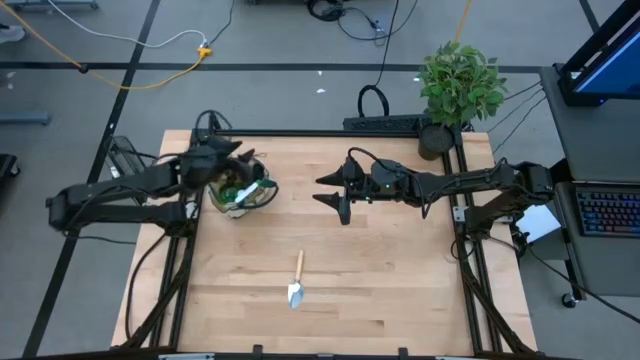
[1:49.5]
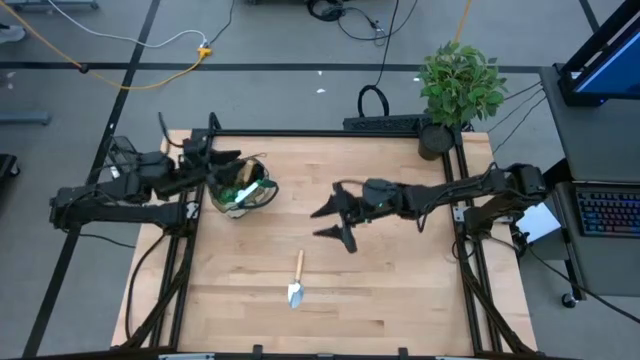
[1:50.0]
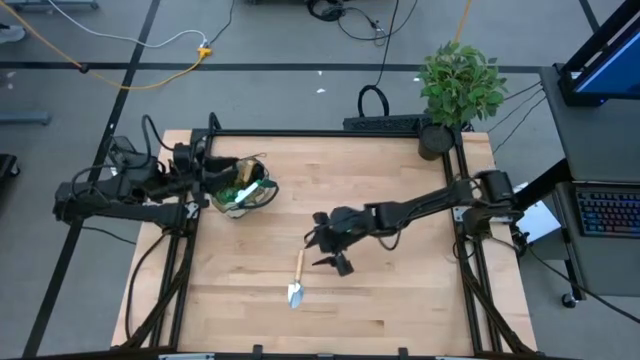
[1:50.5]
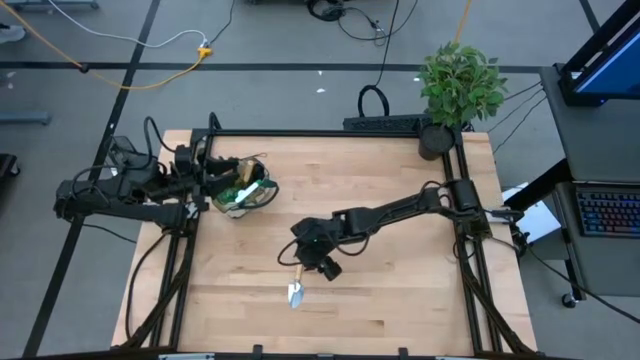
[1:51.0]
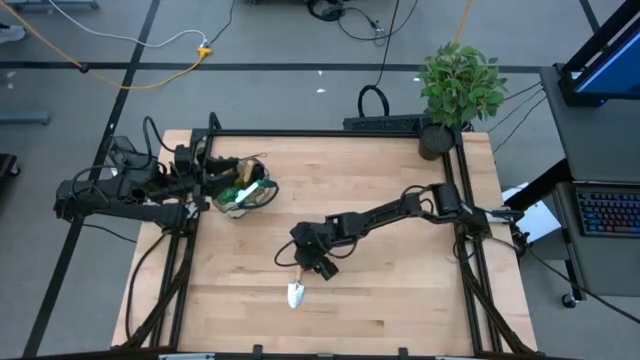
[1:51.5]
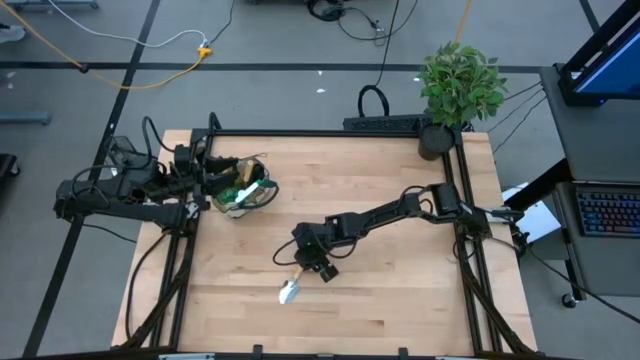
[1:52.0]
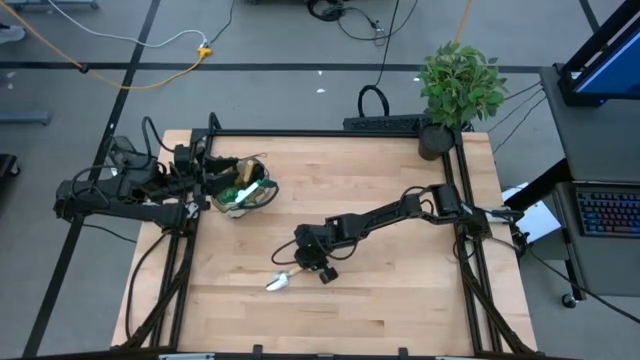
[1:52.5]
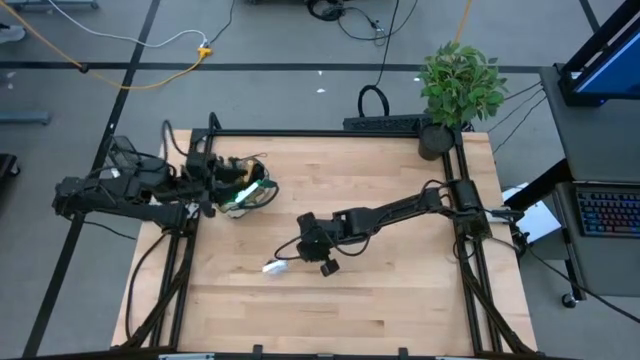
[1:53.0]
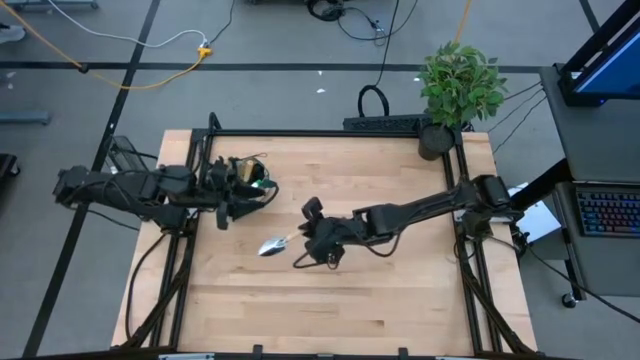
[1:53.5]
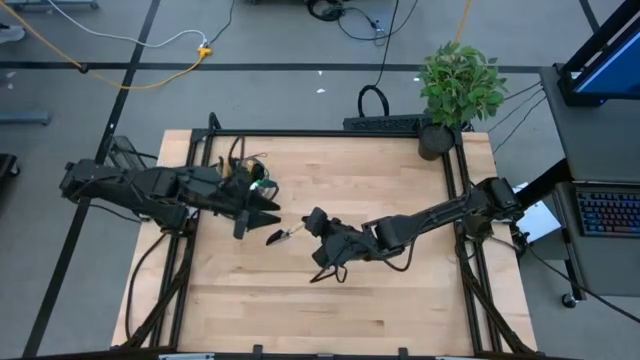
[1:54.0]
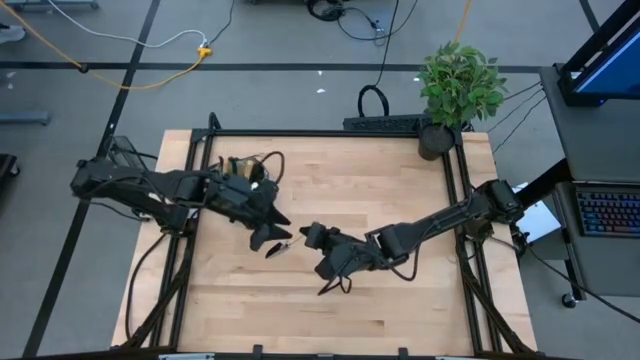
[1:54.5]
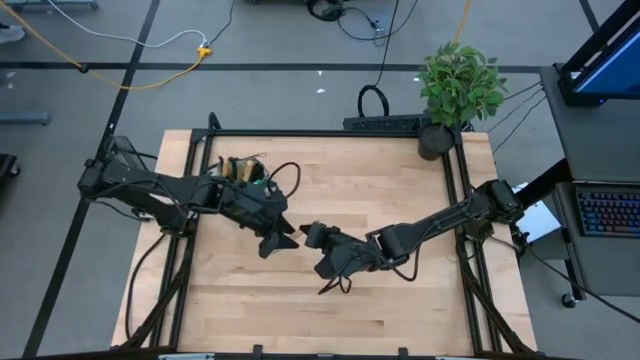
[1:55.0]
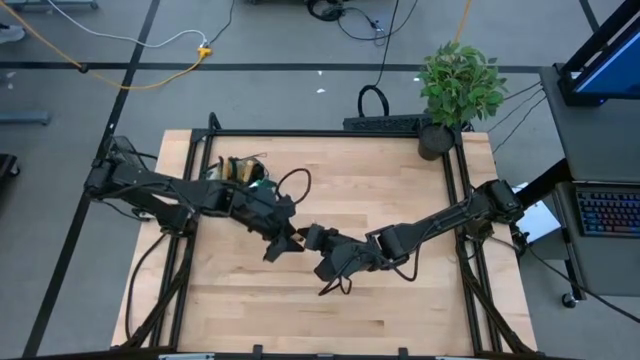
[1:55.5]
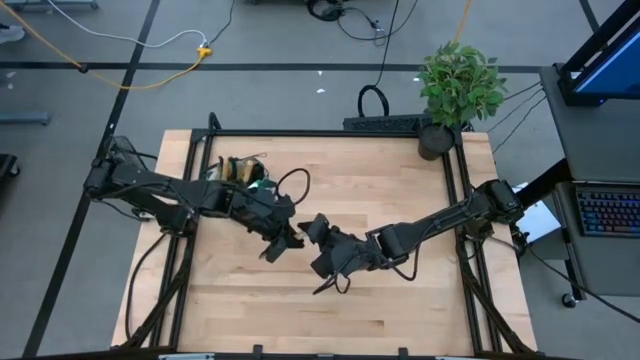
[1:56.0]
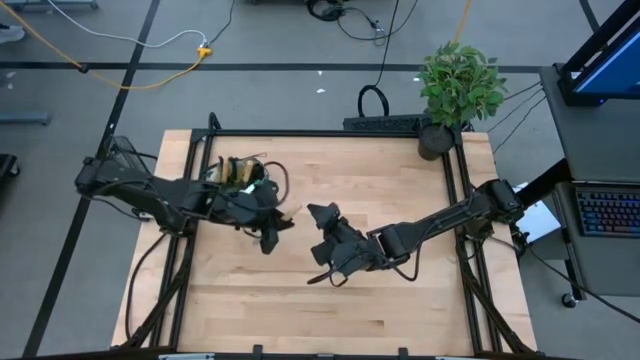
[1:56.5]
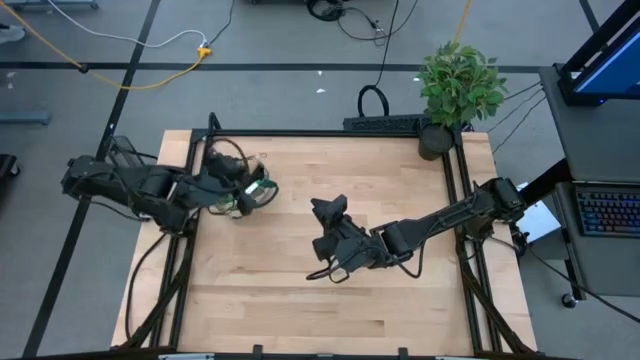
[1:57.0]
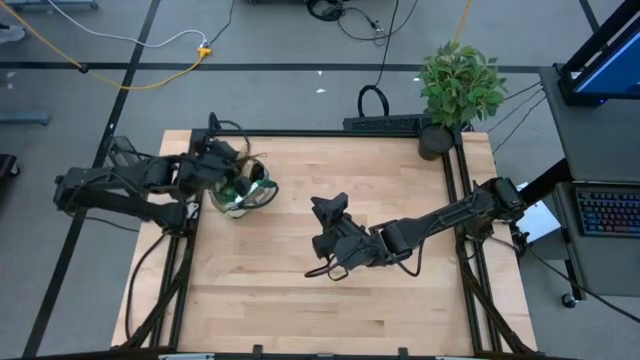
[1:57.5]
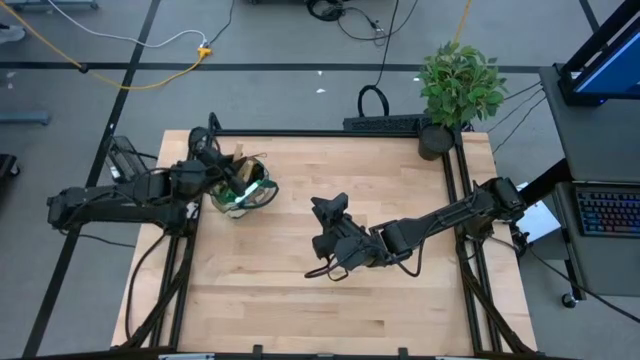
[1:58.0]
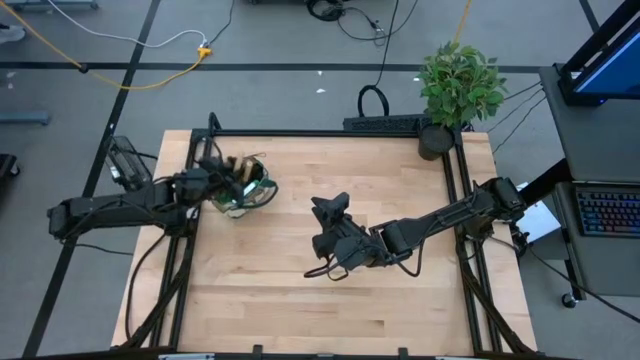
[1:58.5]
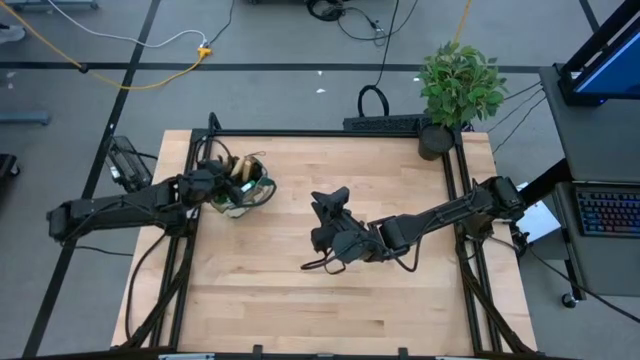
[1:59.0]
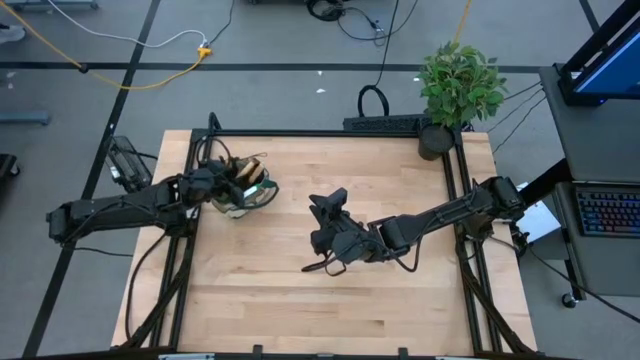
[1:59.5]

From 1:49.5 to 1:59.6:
Task: Pick & Place Garden tools in Gardening bag
Put the trowel into the gardening bag

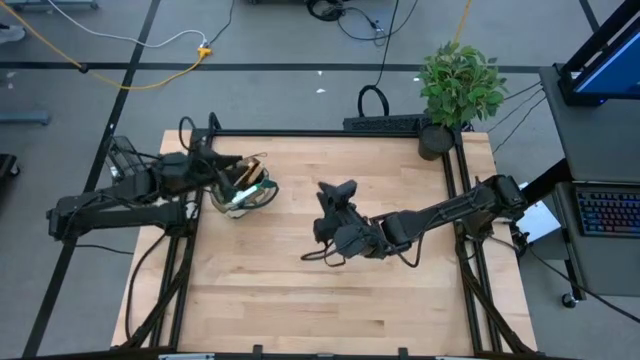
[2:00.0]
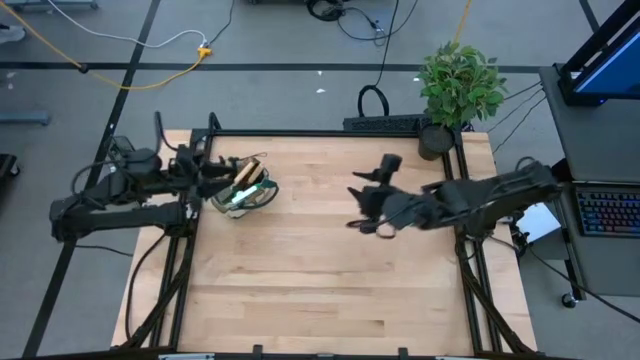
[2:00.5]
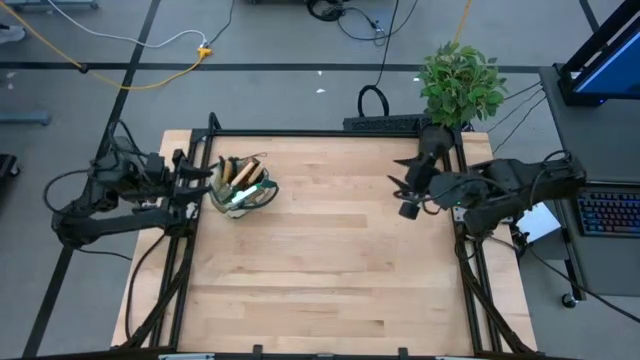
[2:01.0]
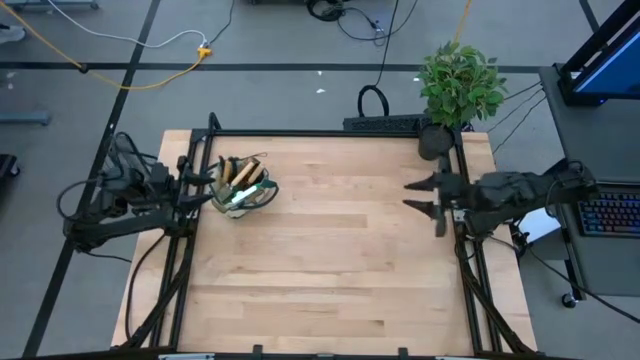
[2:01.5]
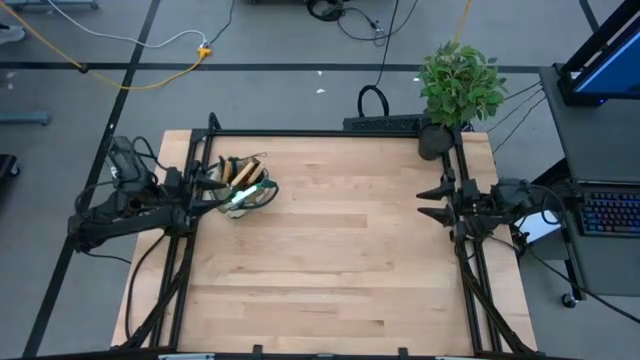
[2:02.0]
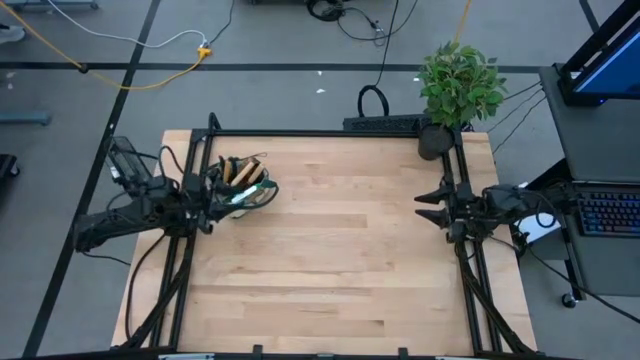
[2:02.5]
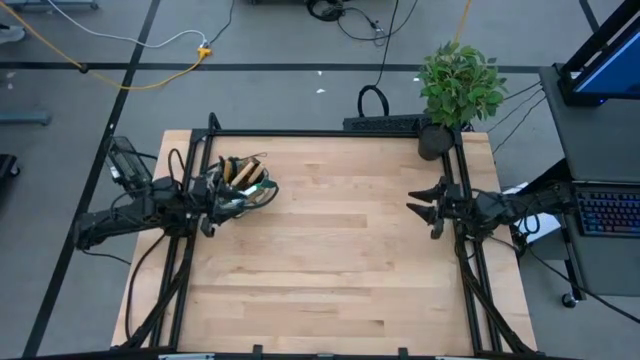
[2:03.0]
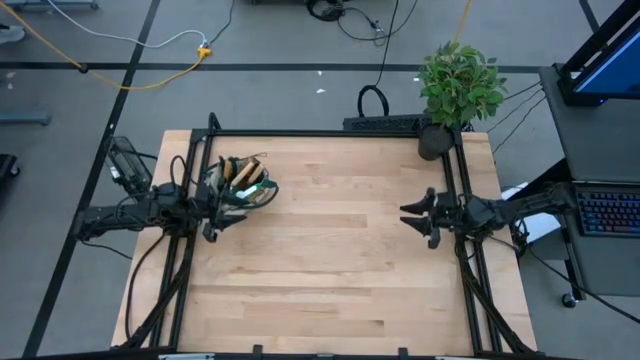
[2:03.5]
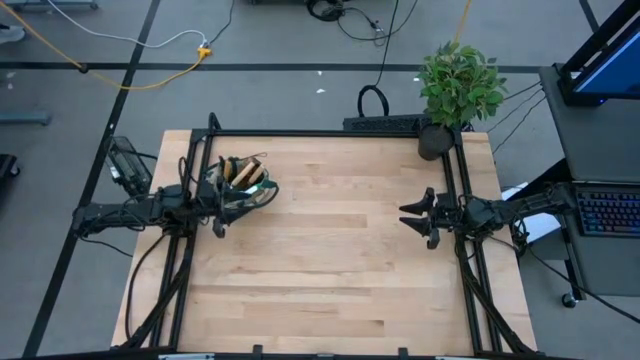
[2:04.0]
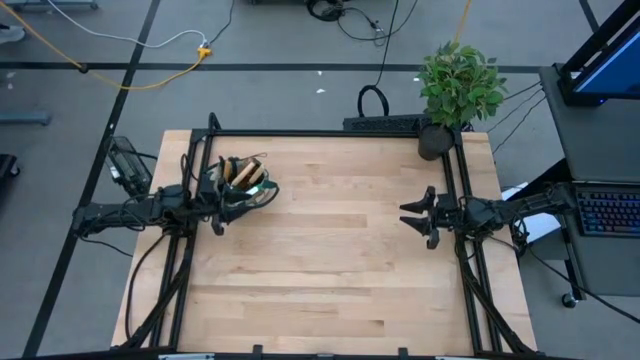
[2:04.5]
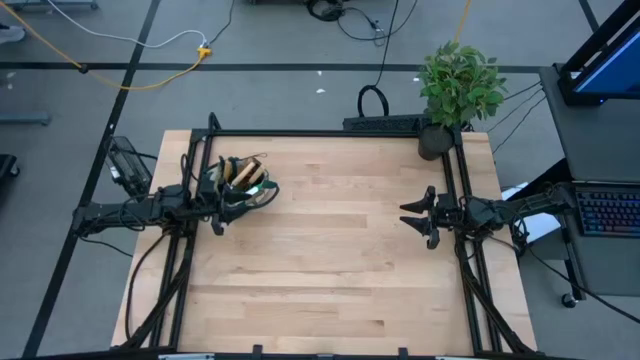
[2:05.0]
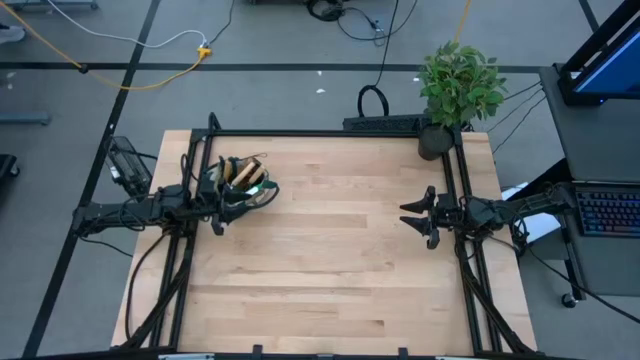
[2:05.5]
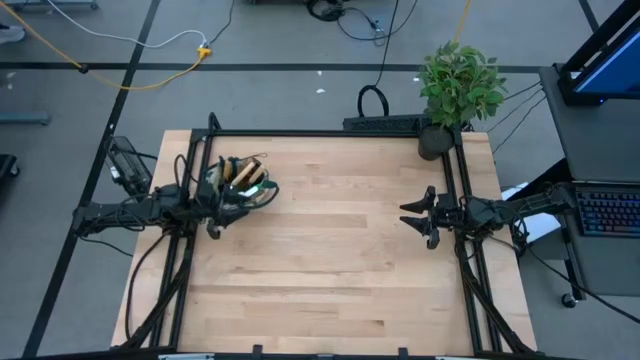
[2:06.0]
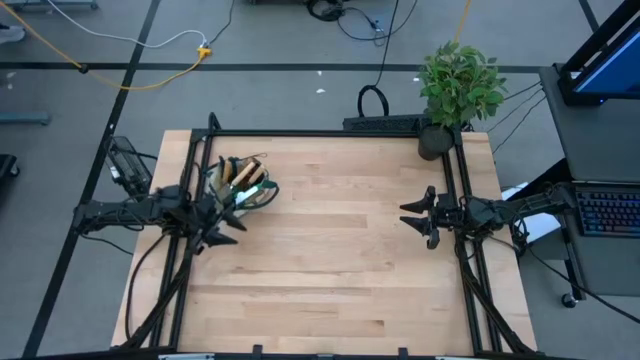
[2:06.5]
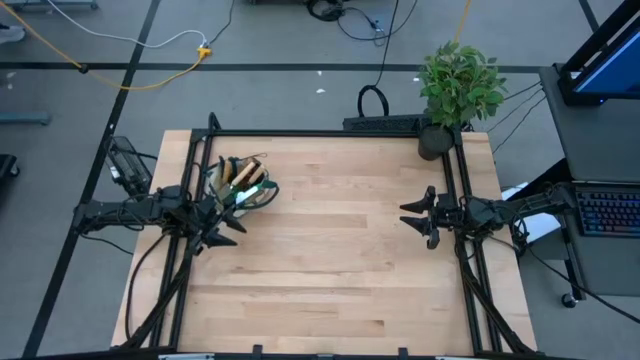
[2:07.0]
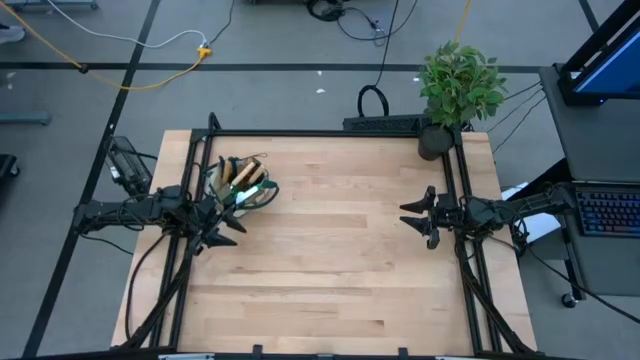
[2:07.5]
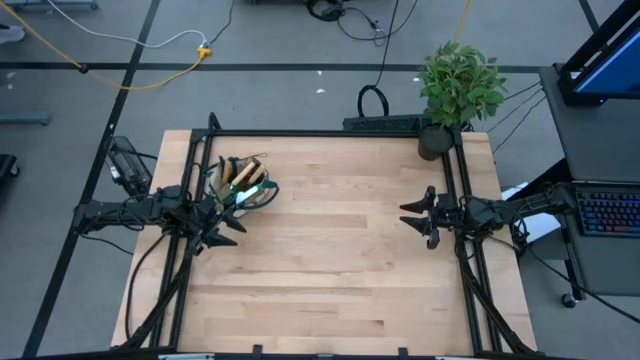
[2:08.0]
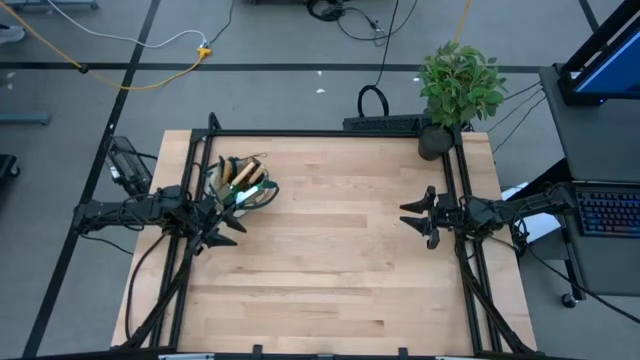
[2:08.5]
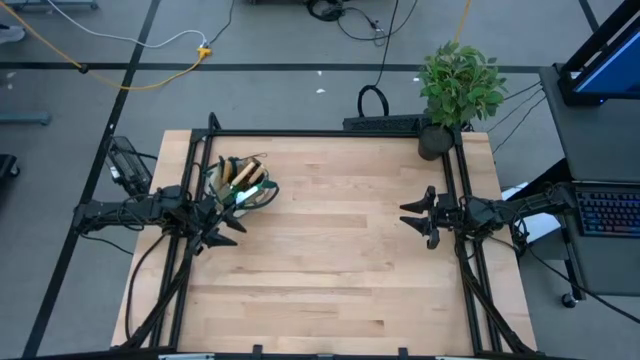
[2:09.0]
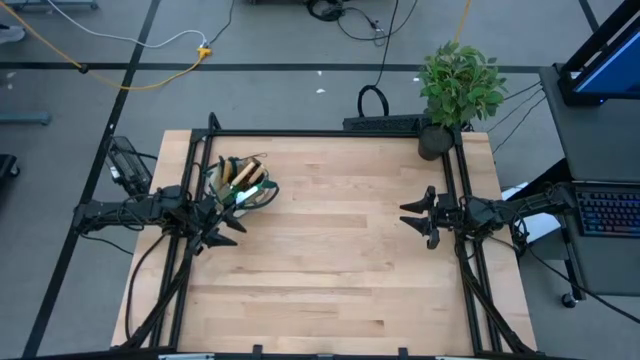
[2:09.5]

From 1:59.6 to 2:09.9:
Return to Home Position

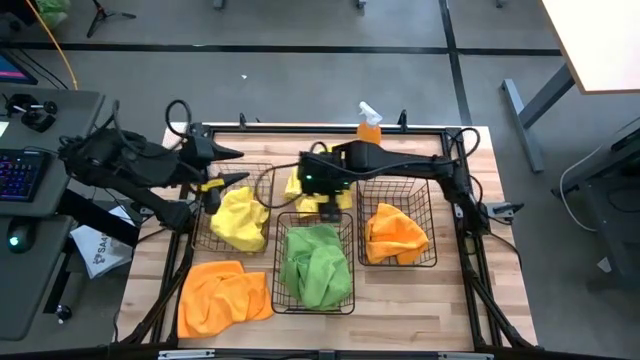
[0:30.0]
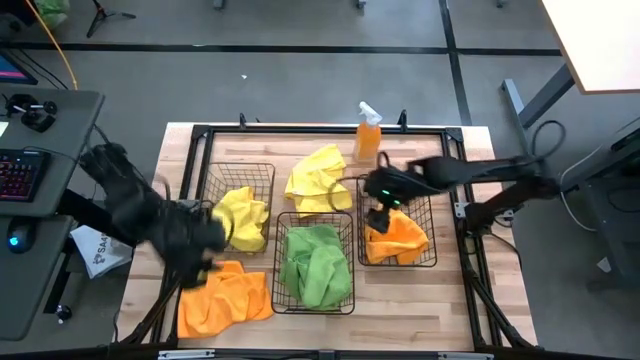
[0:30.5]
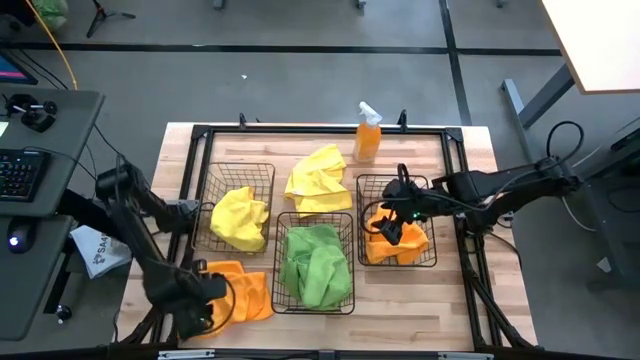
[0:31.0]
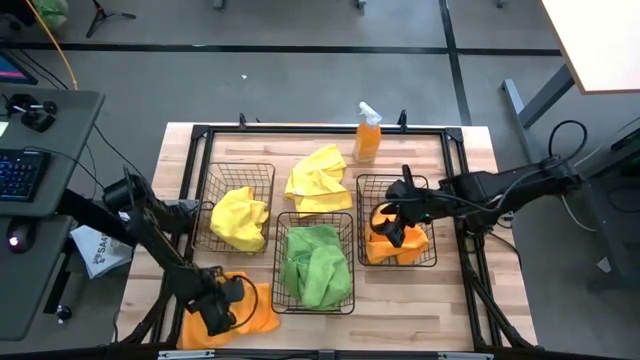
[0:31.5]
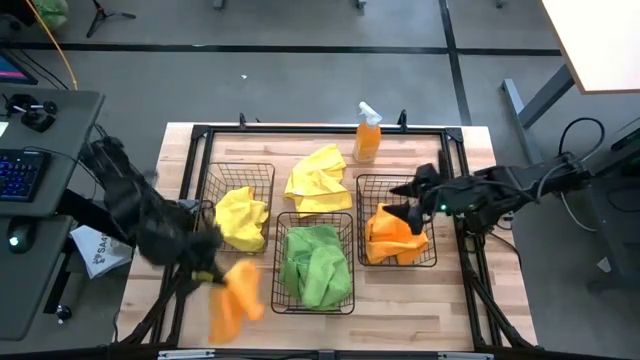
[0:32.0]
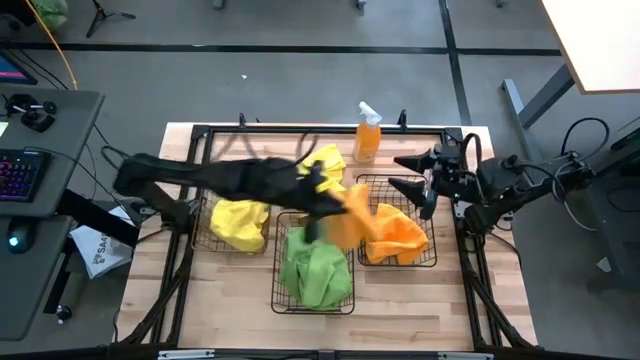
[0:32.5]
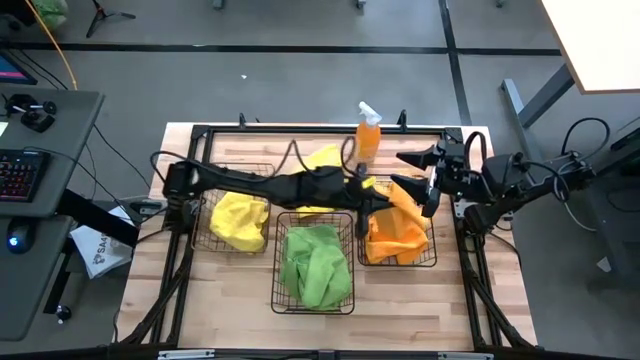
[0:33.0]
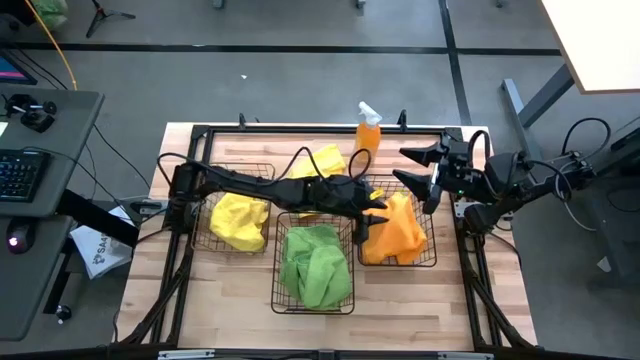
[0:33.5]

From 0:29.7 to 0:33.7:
Task: Sort microfiber towel by color & place in baskets
Put the orange towel into the right wire basket
